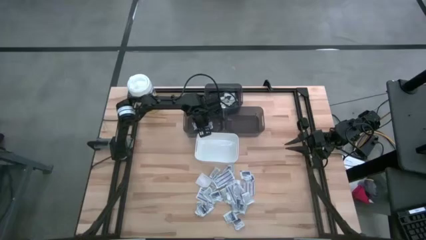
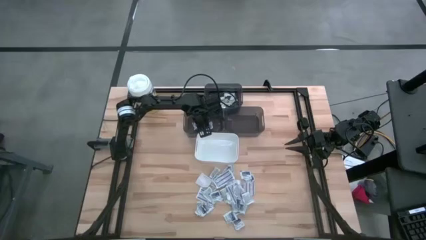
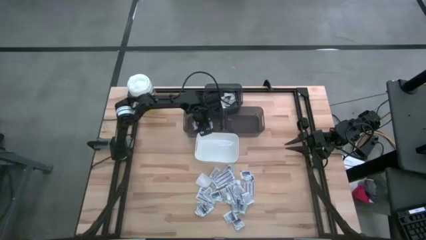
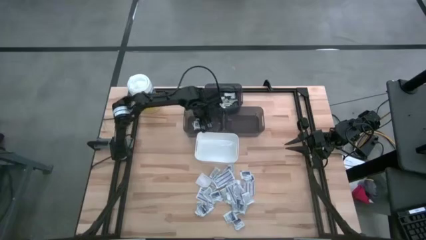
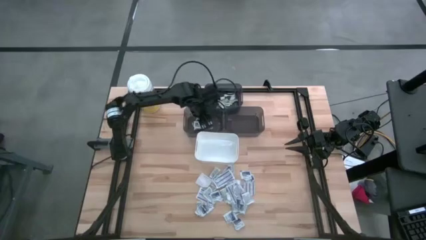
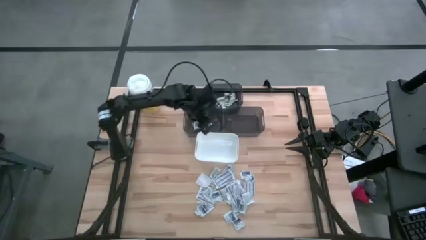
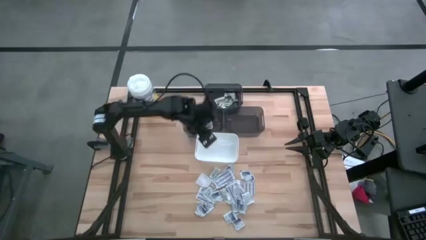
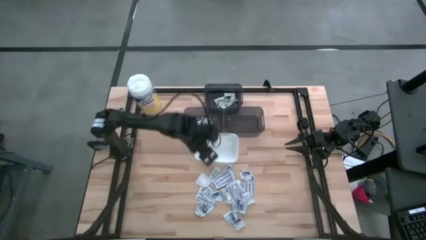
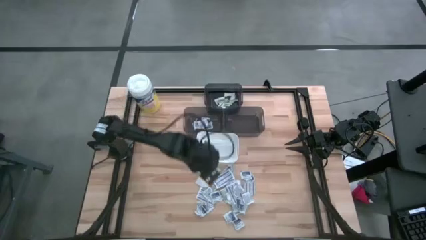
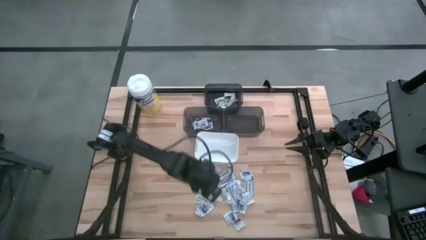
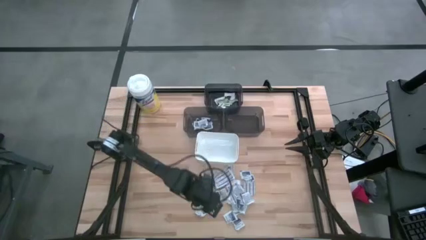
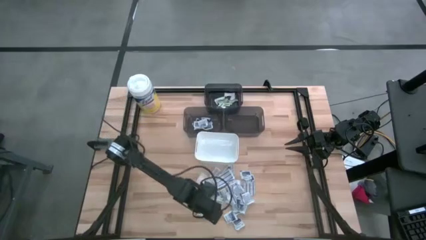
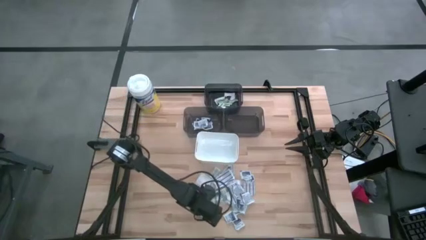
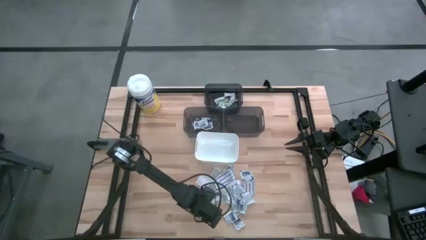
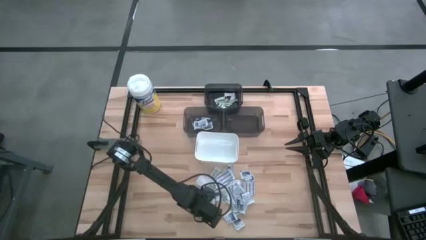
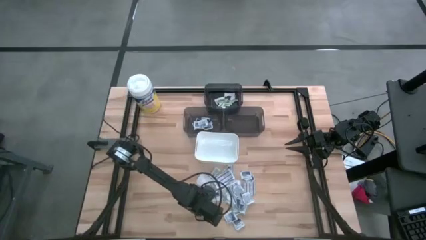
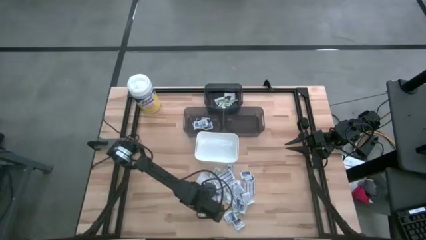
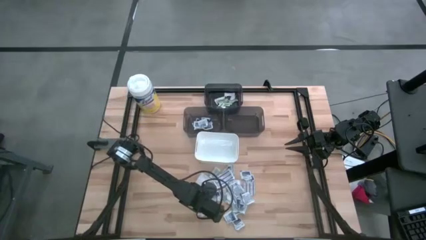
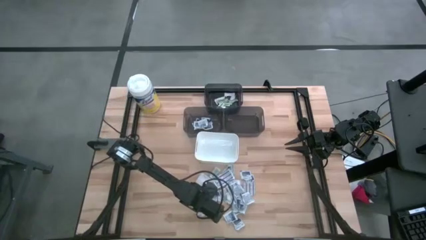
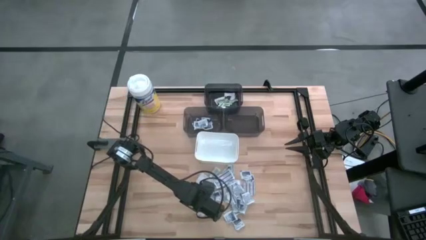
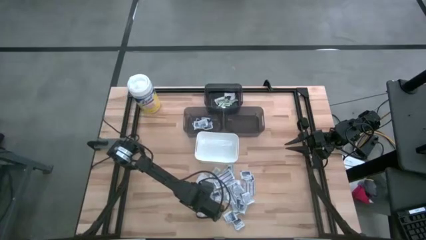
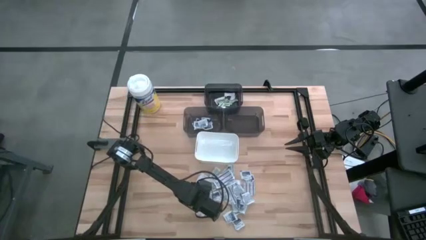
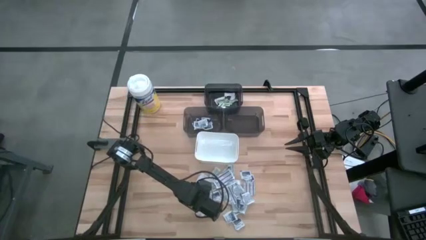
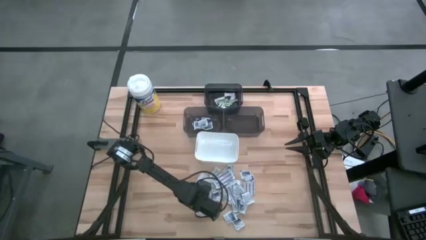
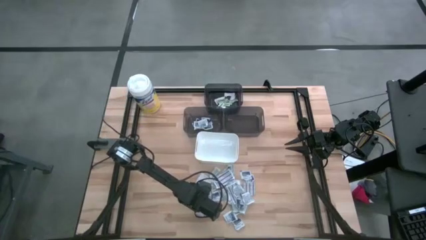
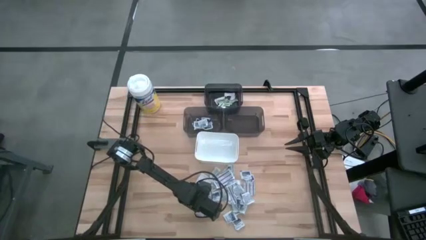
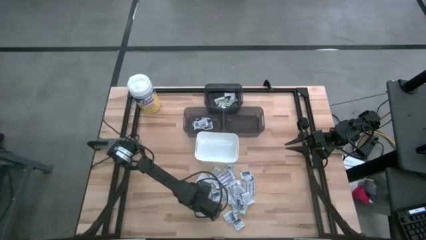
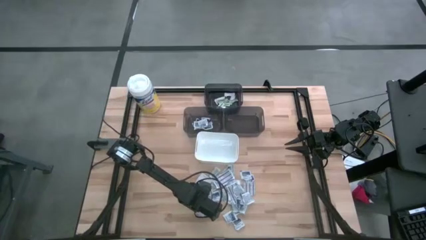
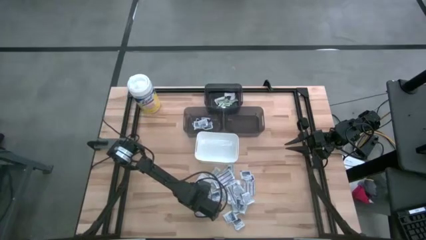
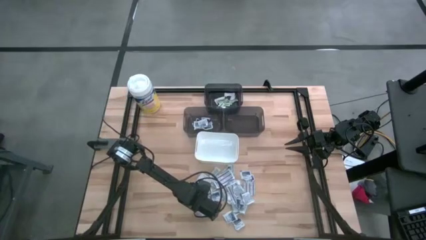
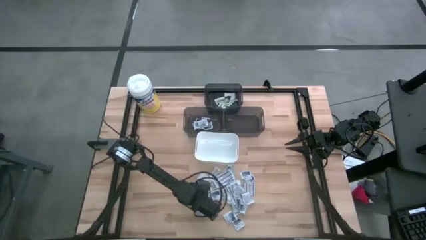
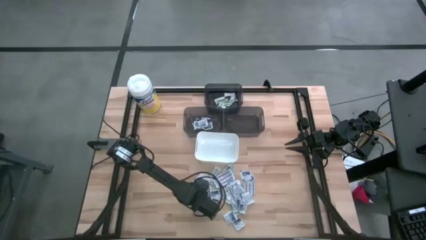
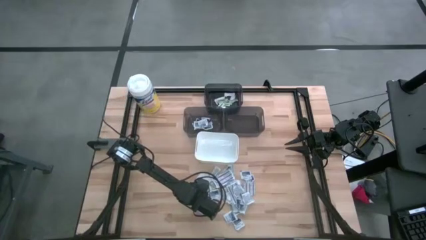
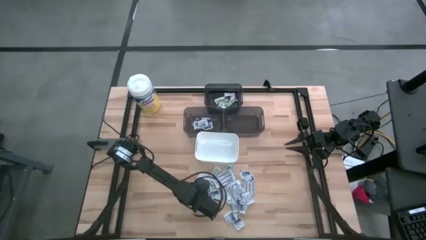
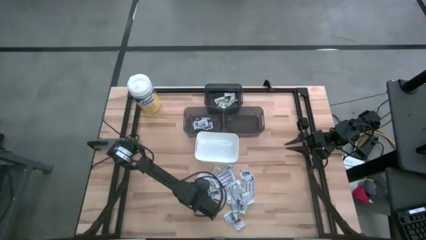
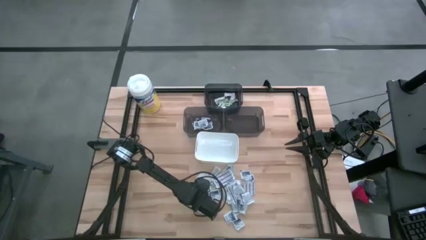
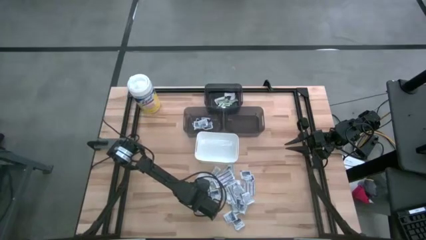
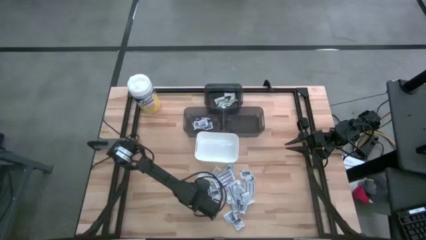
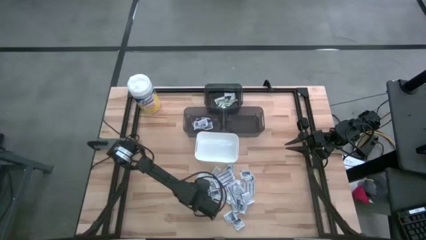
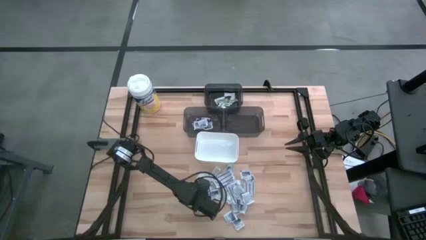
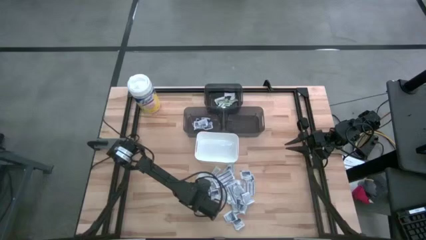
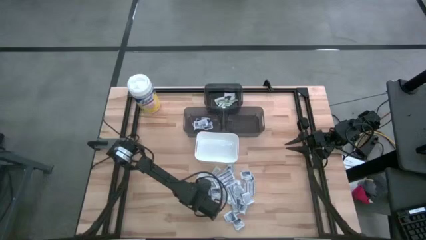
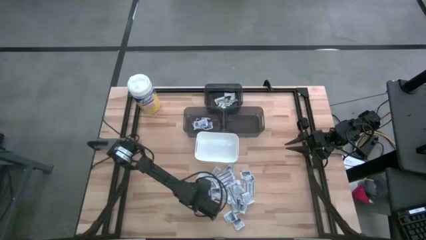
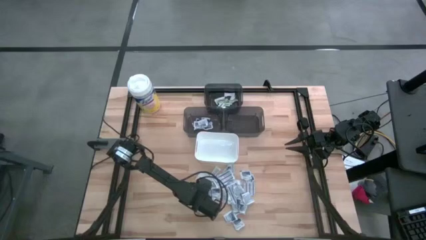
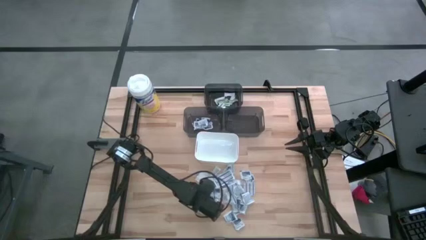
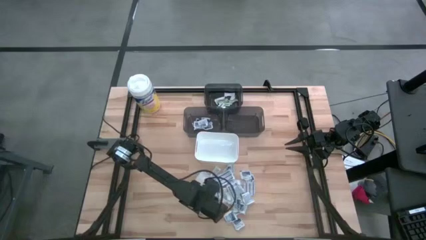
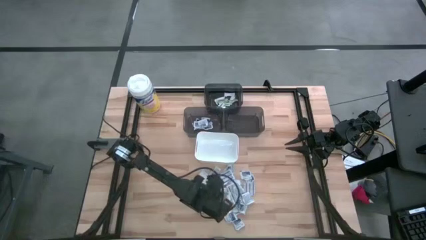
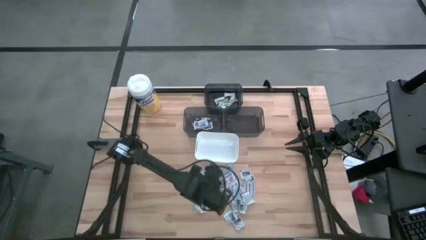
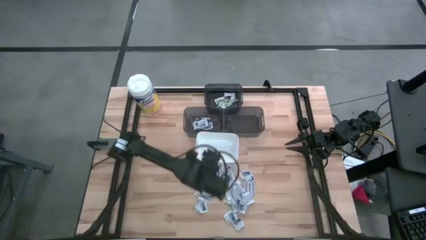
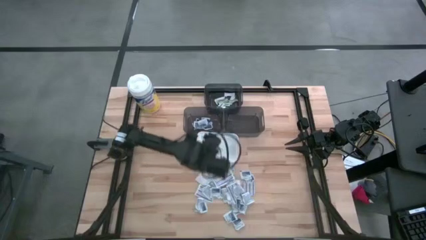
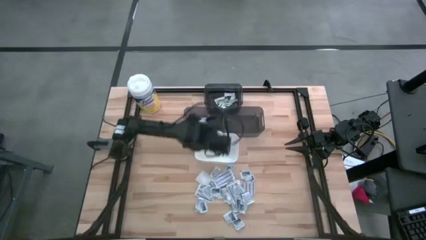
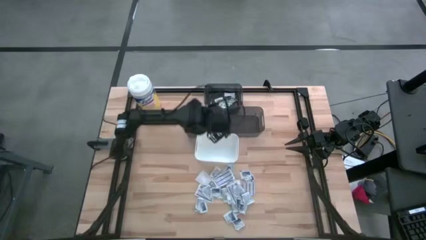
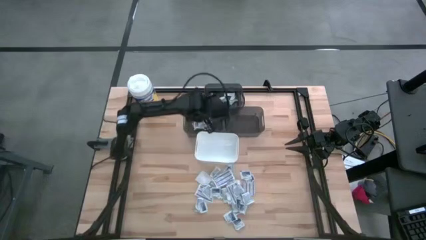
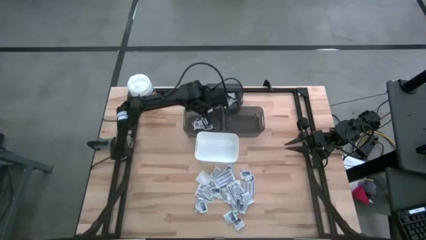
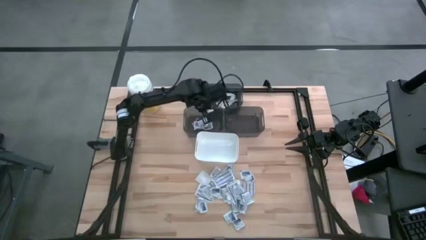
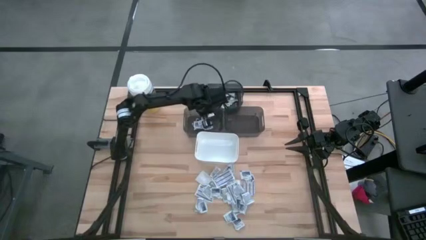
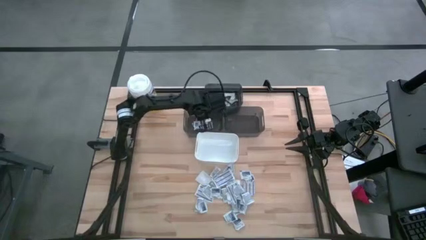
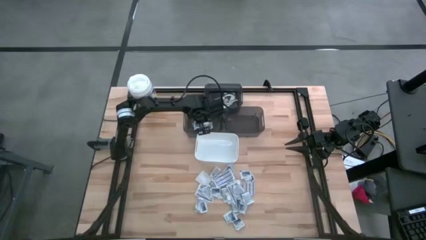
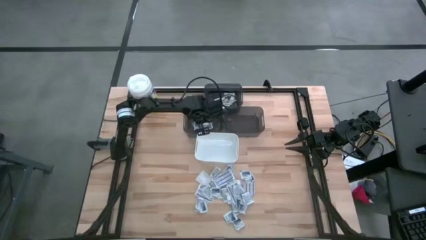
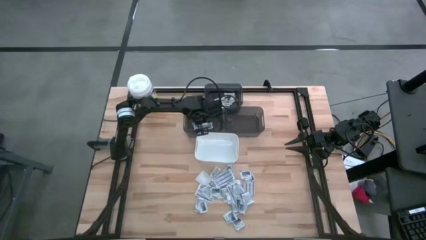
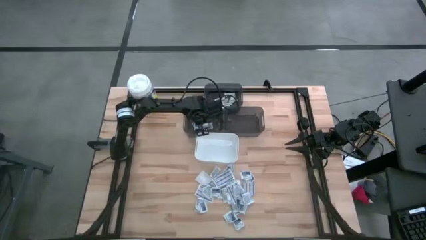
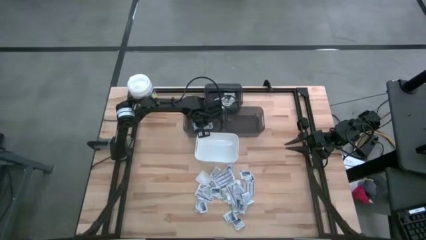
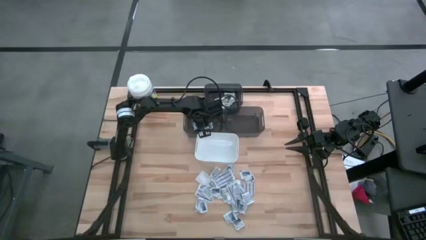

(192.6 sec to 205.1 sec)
Task: Pick & Place First Aid Supplies
Put the alcohol pad into the left black bin

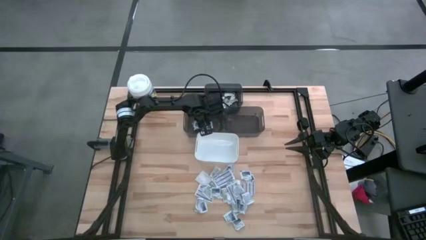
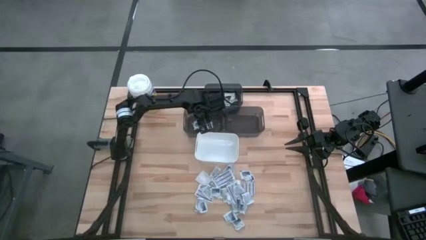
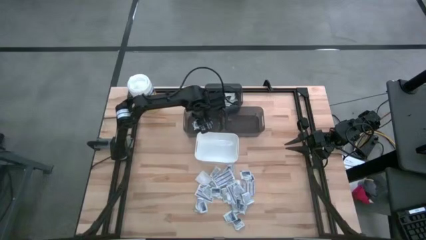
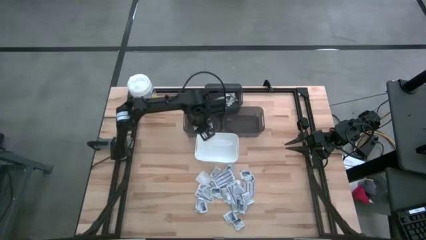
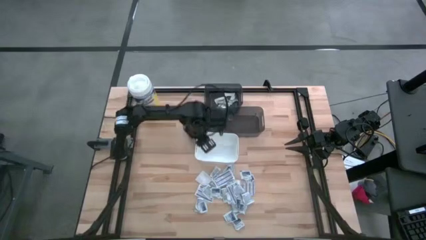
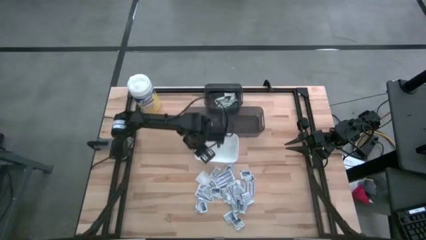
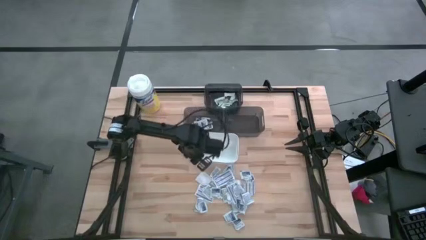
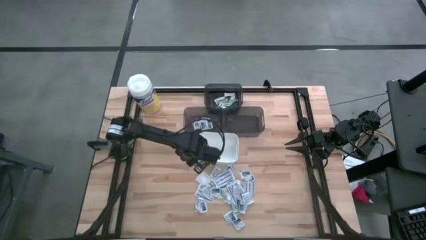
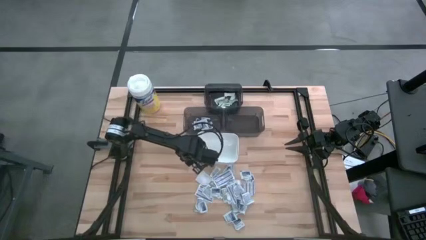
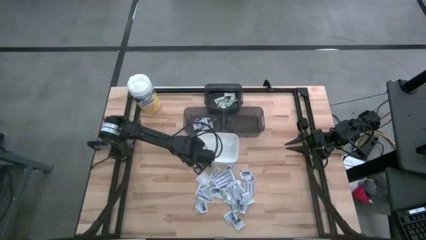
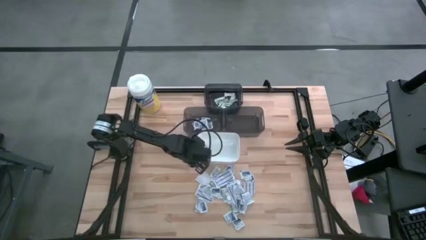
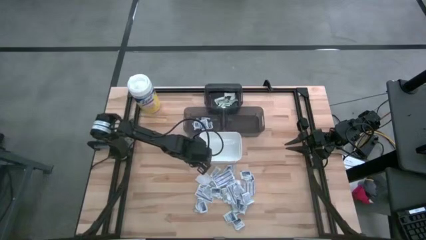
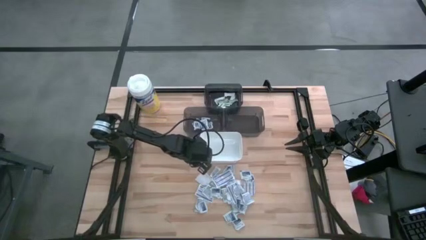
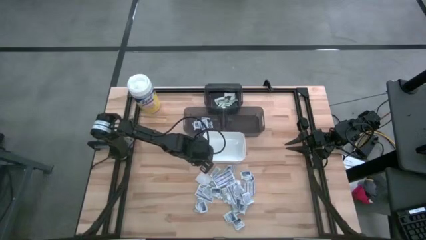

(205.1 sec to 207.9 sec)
Adjust the white bin

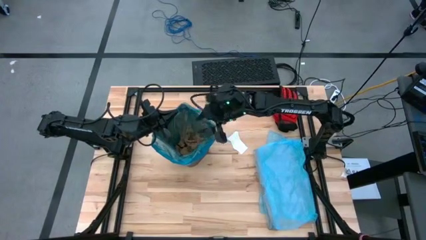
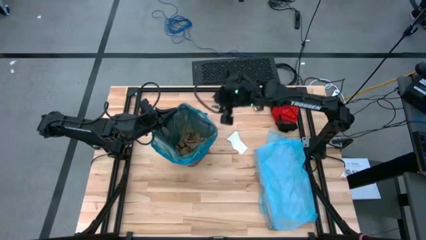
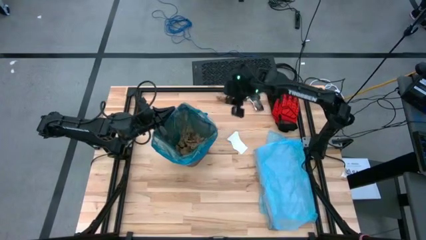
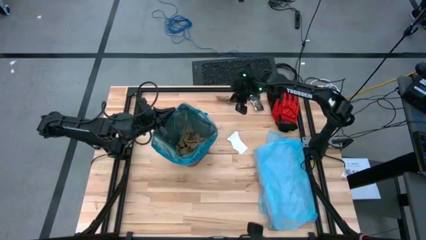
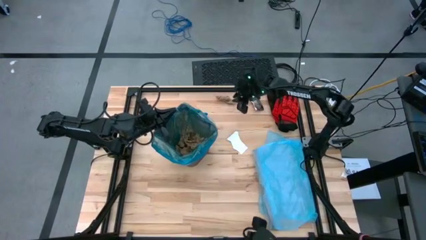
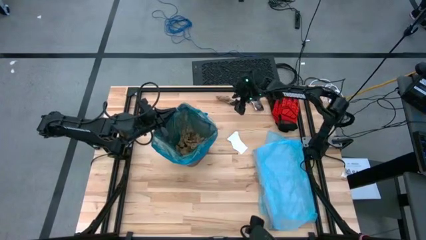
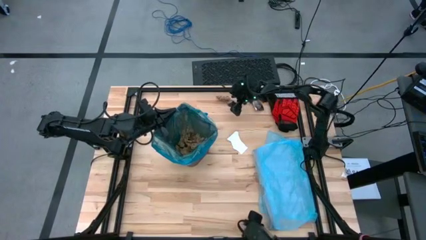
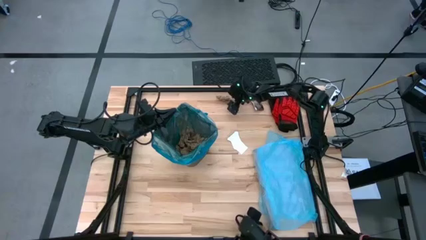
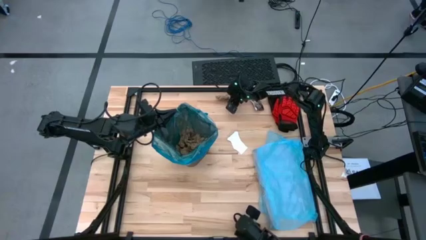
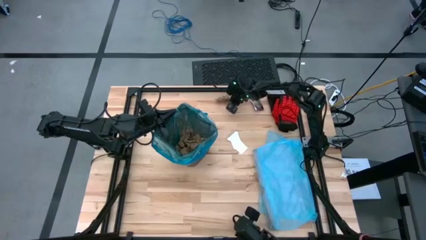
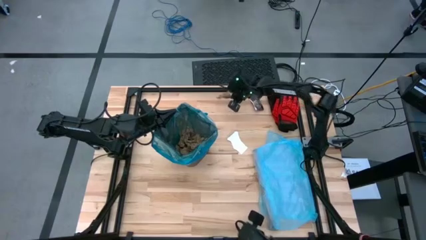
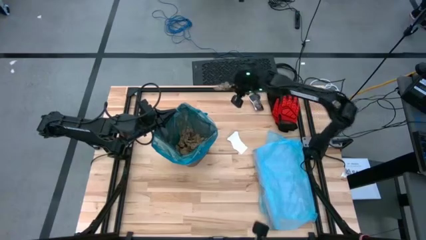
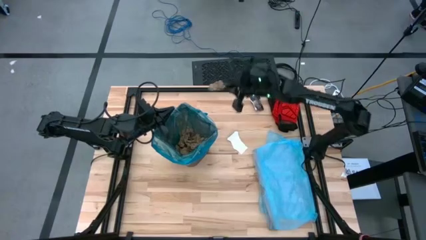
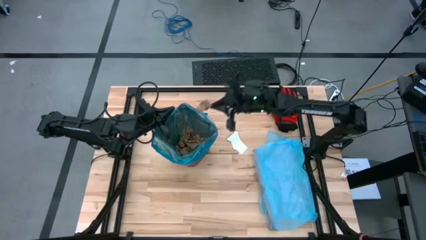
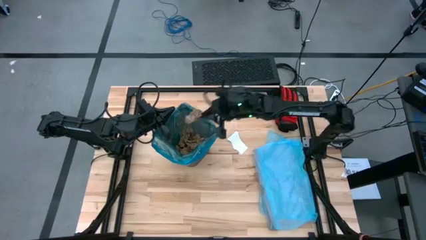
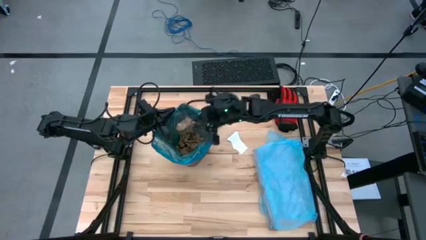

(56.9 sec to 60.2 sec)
Task: place trash/remove bag and relplace
Put the brown napkin into the trash bin
